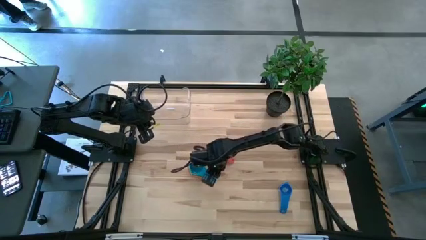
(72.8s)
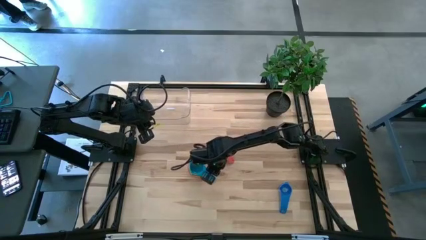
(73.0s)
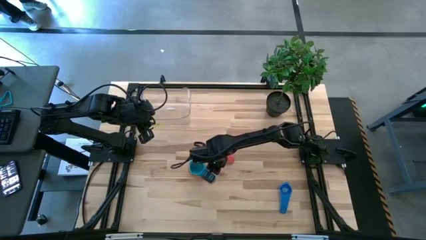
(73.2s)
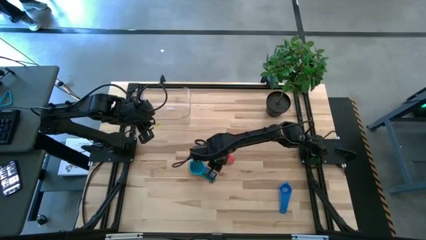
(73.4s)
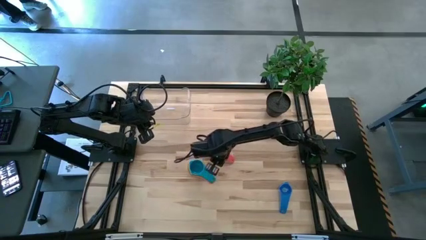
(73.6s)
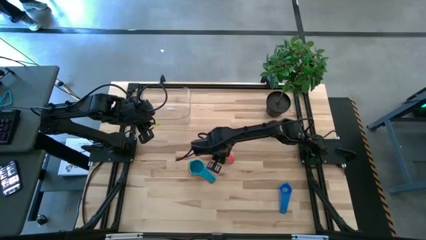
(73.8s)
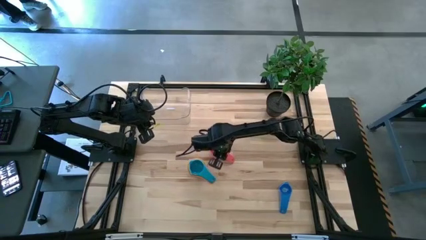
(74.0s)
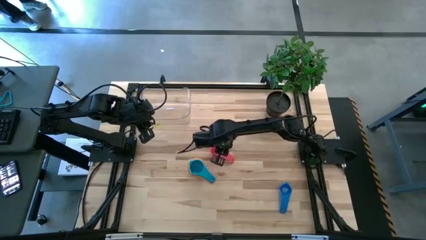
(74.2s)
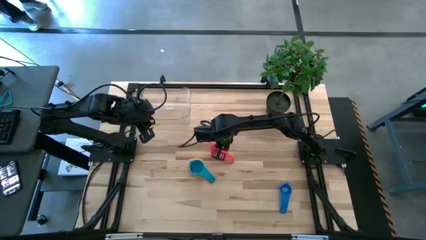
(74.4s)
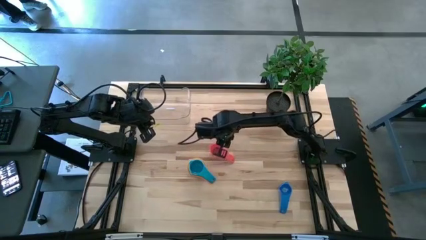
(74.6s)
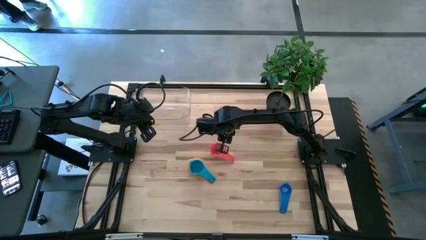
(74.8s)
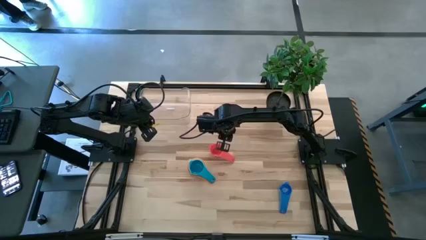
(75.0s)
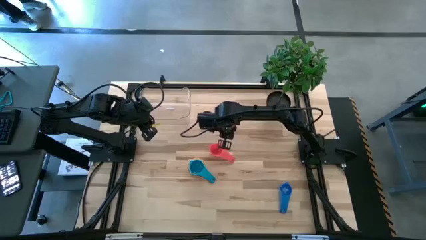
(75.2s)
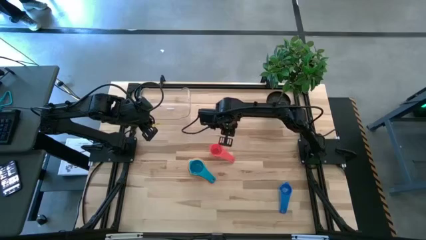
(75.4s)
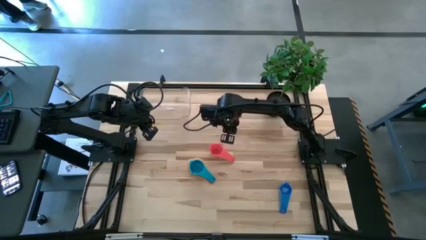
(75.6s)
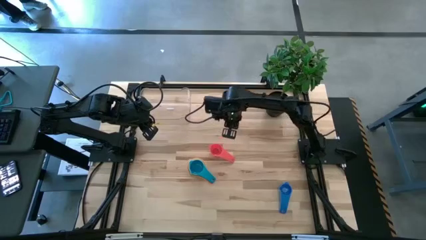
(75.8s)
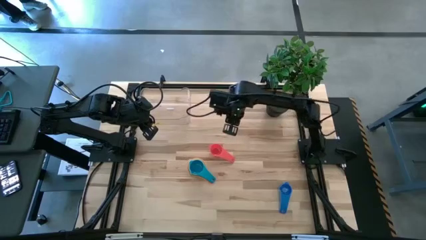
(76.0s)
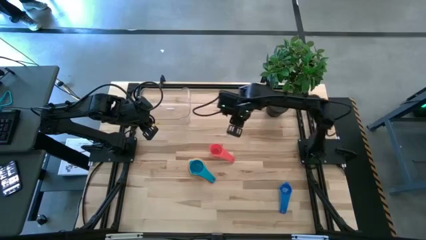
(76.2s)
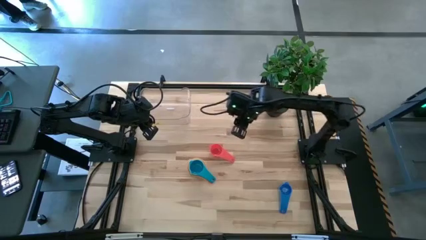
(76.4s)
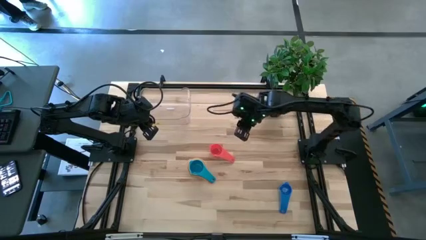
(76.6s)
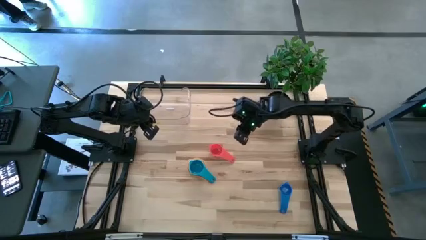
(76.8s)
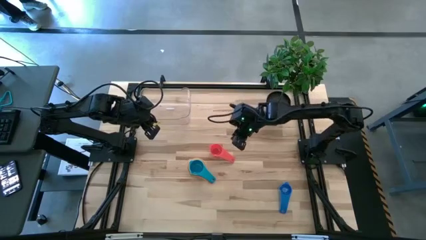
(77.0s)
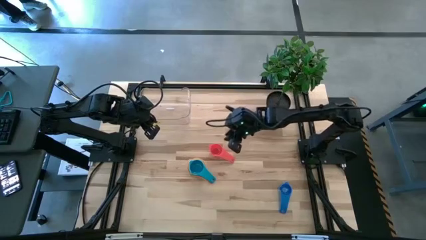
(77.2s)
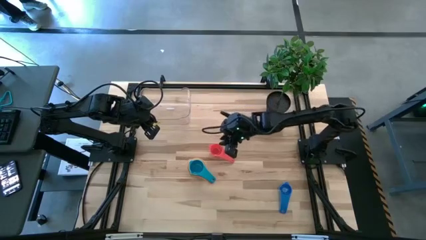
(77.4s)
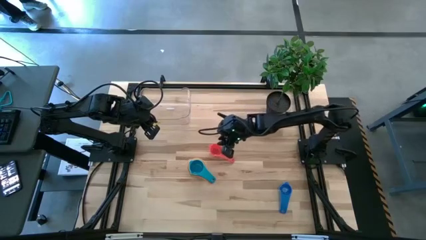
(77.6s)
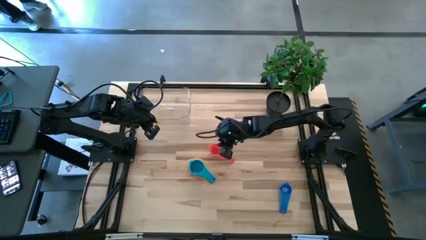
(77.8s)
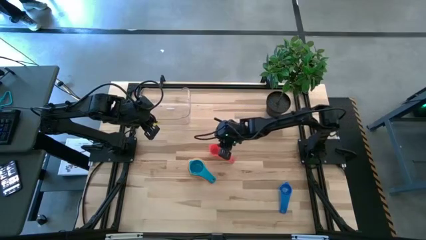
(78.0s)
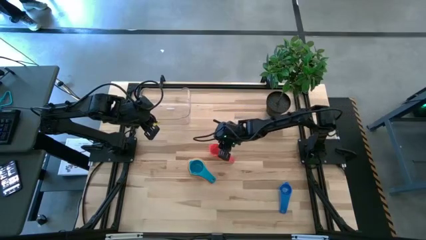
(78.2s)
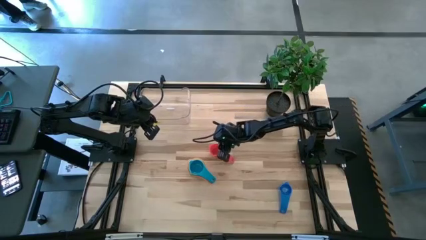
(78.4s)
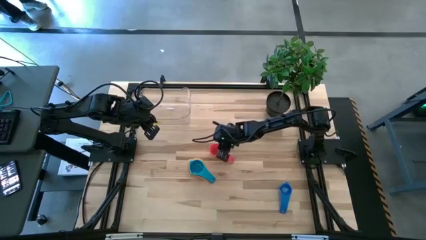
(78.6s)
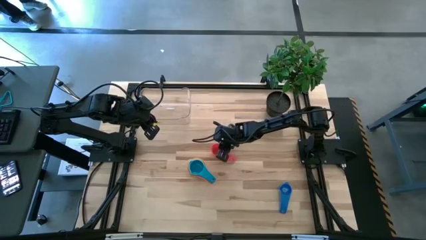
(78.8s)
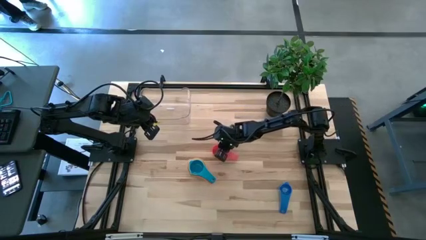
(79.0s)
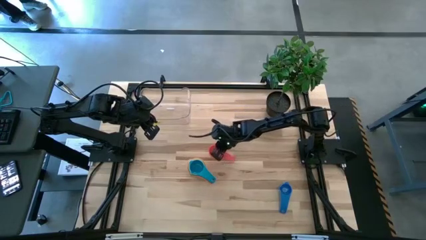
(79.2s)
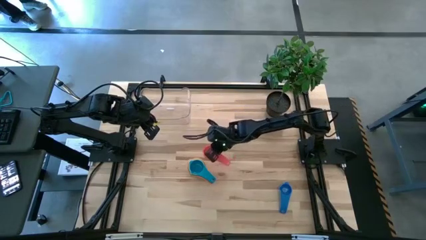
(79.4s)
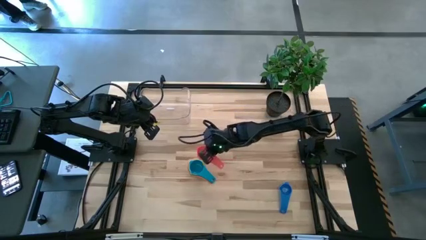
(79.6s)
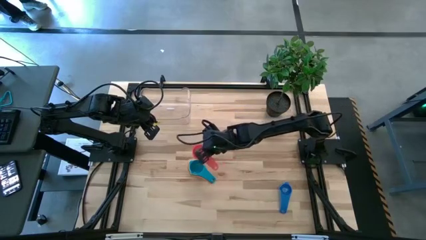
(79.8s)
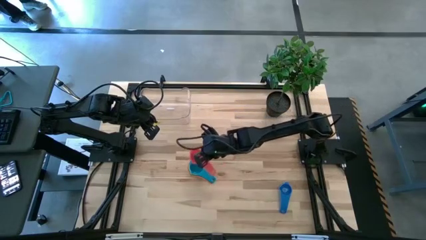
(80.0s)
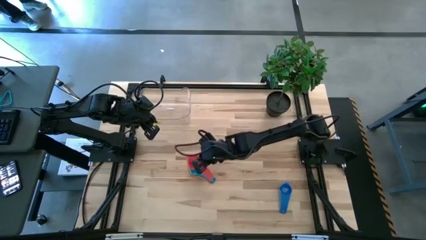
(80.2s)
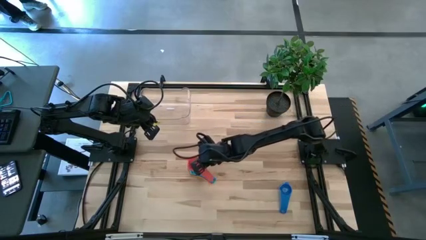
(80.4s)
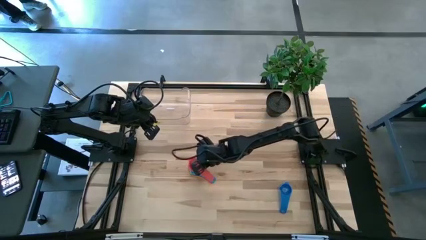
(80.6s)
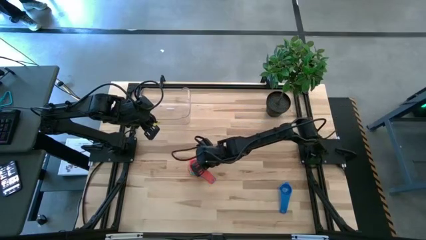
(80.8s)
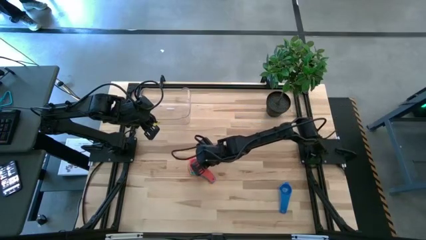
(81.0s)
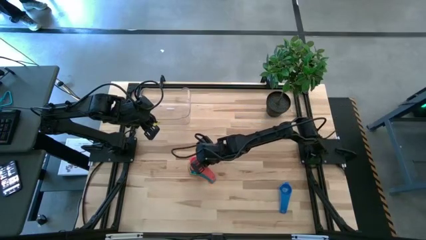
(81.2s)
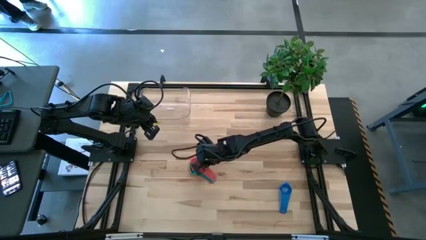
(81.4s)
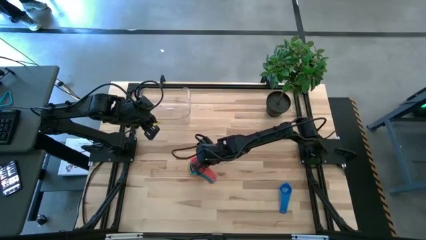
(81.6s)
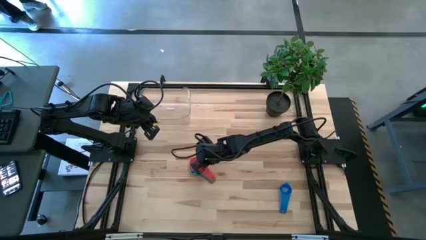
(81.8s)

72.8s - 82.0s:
Task: Nest measuring cups in basket
Stack the red measuring cup on top of the light blue measuring cup

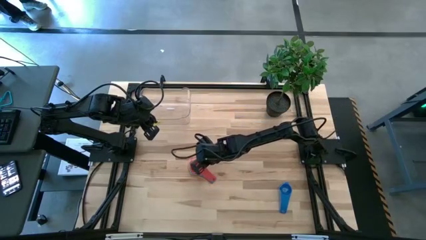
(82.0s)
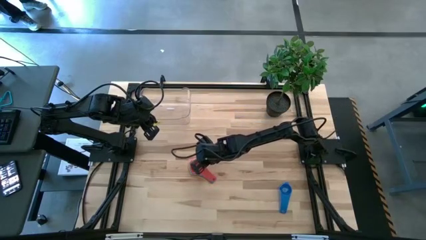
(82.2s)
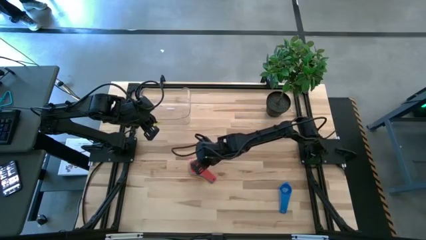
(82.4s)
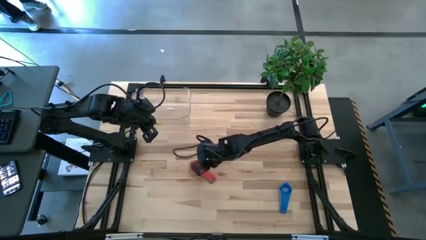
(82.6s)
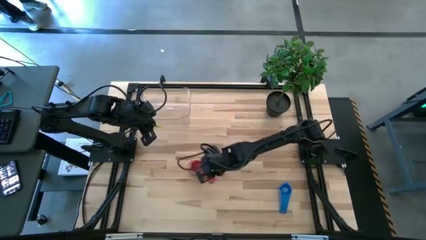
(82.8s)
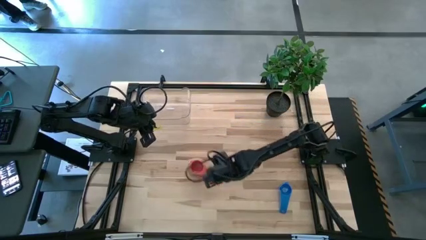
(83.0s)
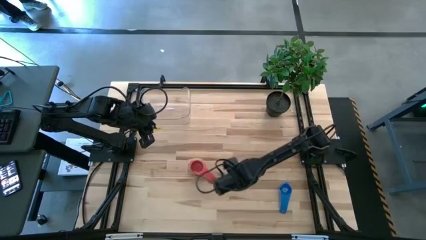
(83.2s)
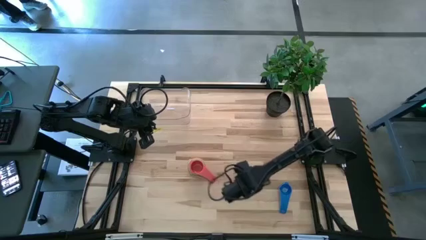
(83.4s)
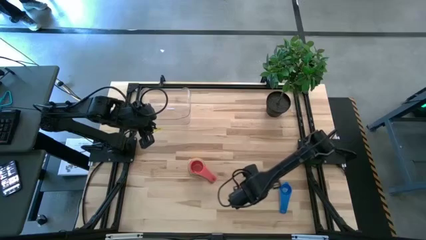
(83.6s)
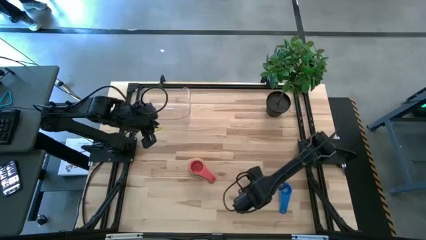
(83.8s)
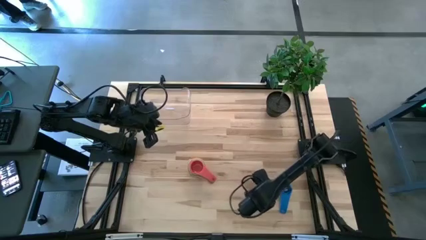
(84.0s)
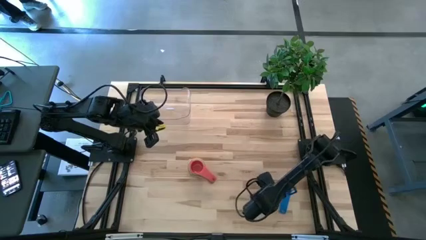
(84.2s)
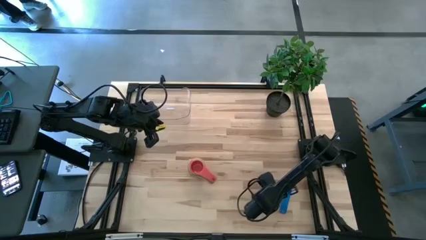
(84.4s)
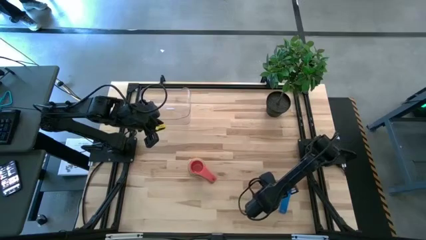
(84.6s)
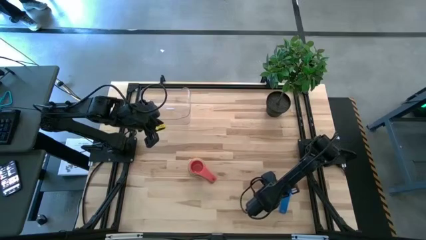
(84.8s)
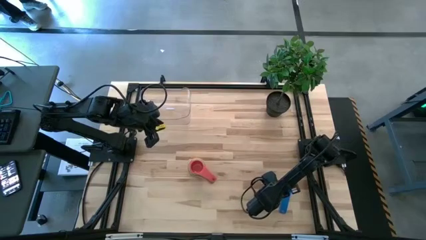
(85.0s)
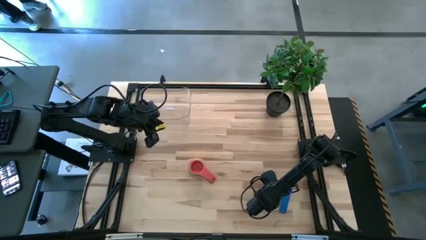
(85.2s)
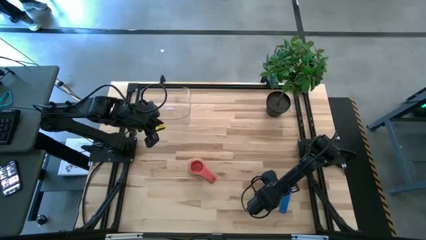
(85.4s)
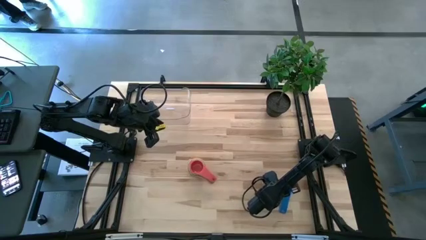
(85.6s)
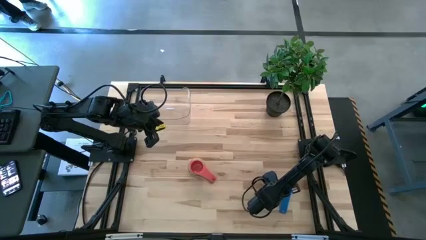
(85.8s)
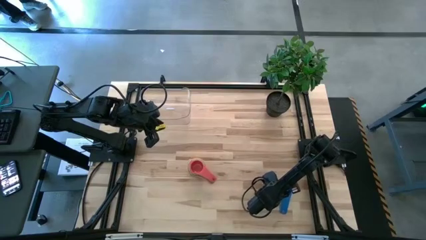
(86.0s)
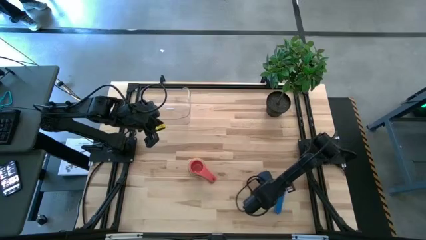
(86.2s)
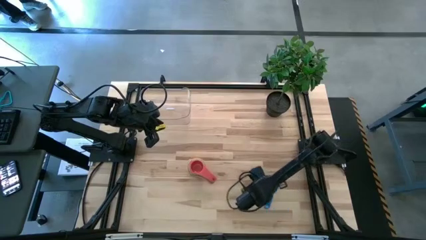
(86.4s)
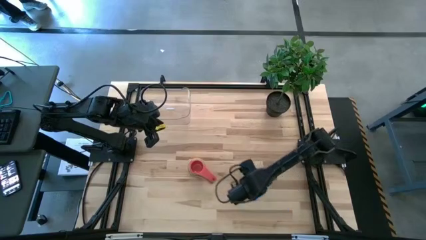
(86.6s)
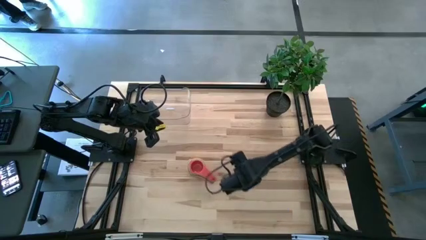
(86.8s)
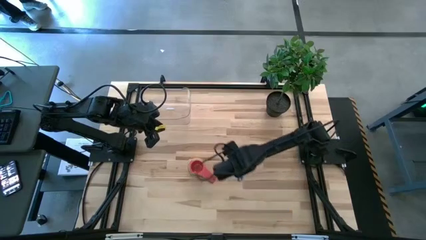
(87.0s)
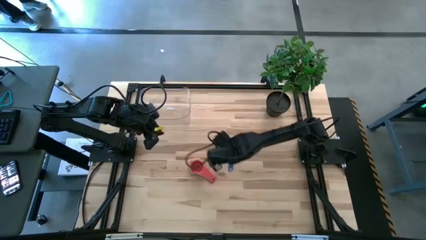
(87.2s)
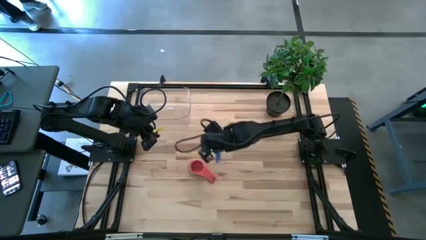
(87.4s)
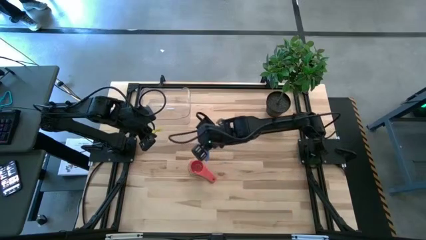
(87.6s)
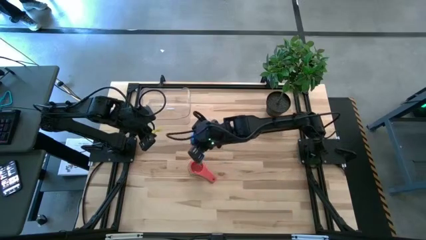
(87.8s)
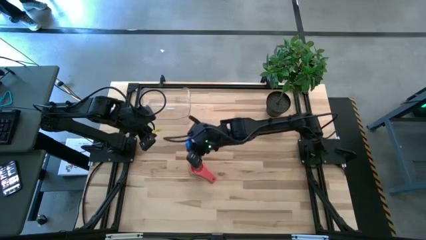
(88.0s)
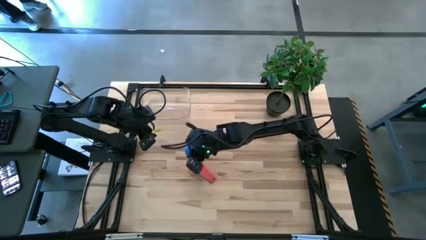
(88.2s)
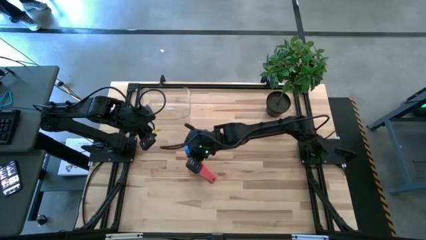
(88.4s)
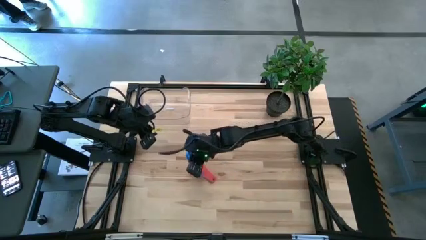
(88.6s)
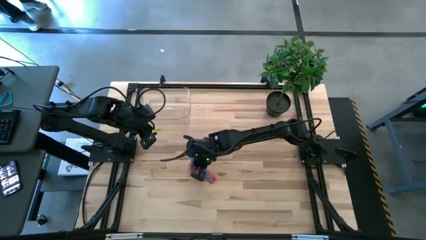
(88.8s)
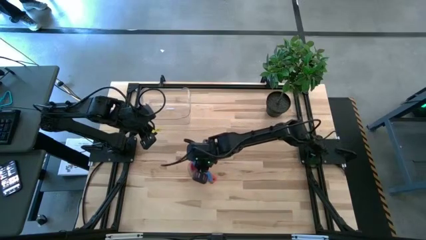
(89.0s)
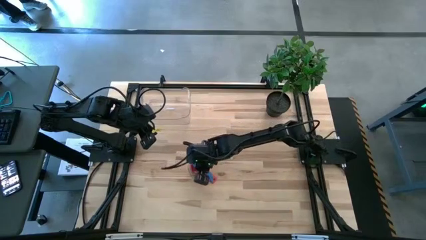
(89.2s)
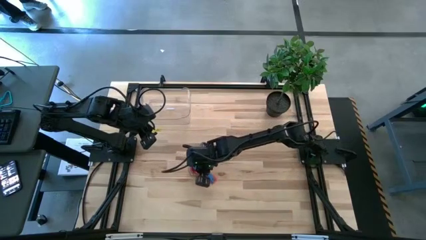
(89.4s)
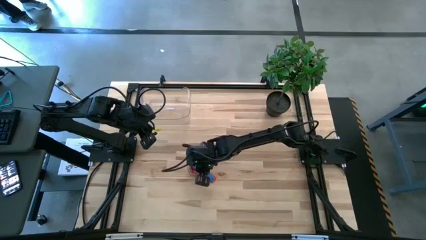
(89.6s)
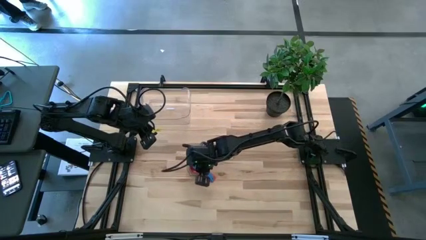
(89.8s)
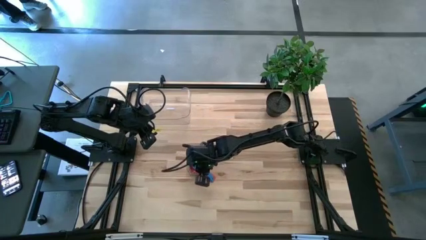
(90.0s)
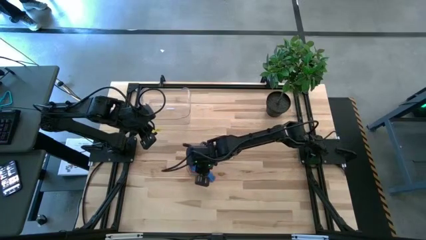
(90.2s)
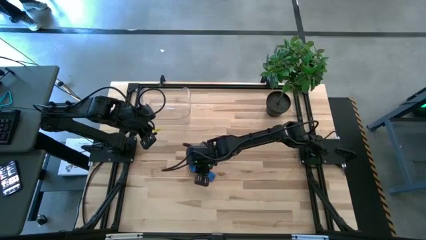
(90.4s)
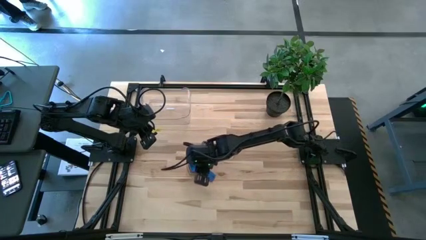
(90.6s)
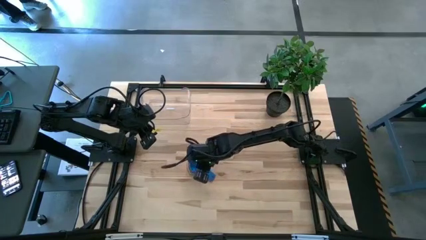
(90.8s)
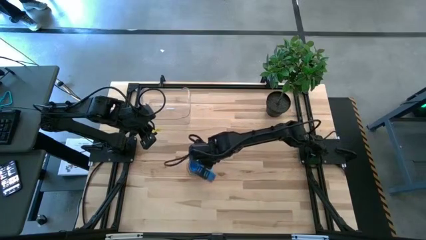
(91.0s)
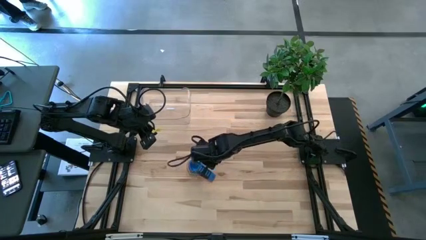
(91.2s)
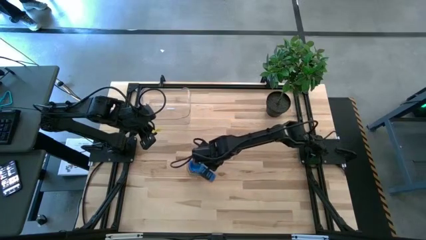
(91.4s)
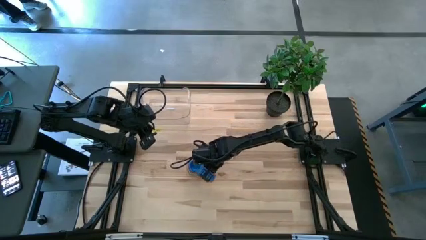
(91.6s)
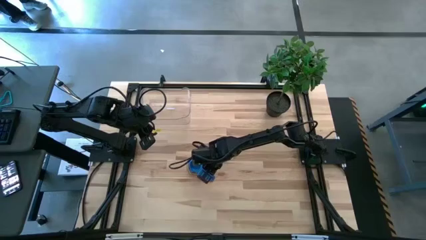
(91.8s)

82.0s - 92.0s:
Stack the blue measuring cup on top of the red measuring cup
